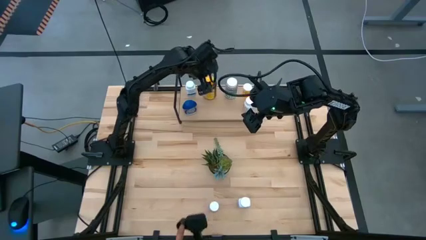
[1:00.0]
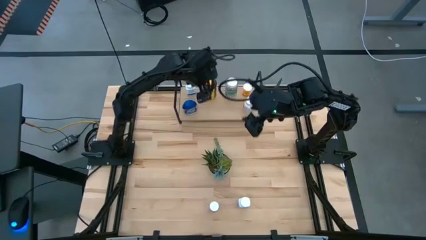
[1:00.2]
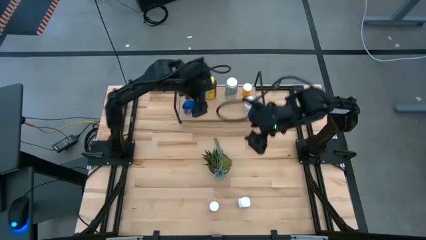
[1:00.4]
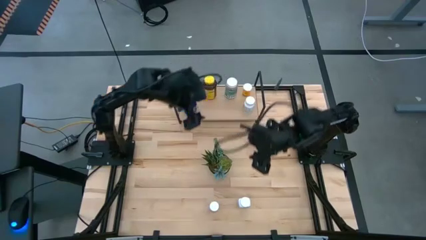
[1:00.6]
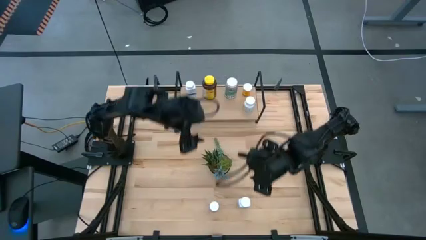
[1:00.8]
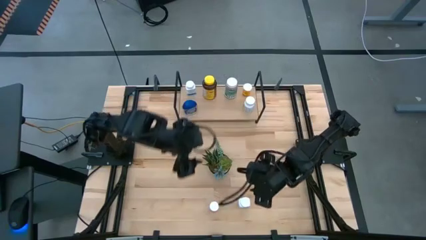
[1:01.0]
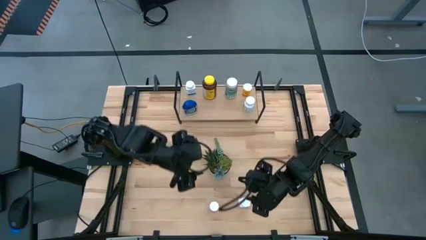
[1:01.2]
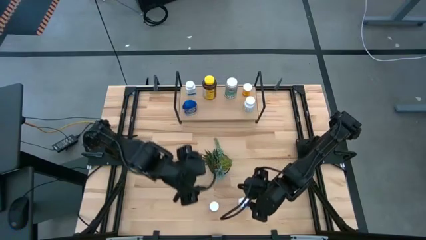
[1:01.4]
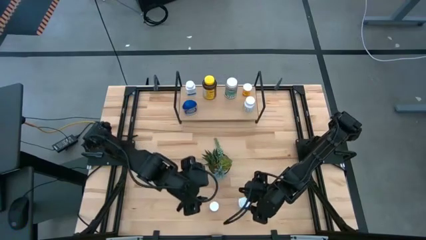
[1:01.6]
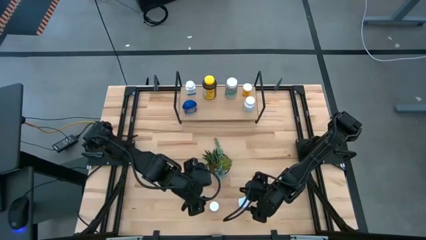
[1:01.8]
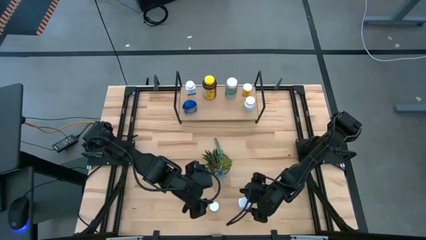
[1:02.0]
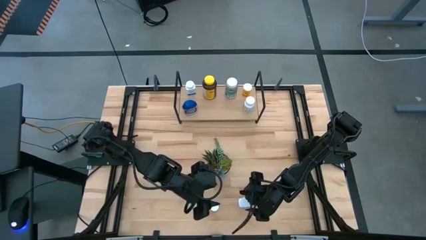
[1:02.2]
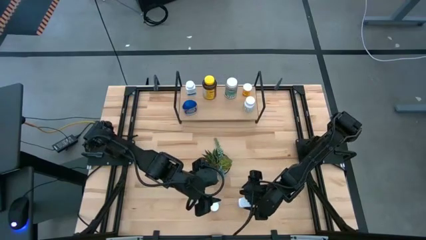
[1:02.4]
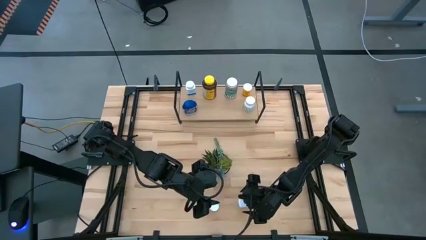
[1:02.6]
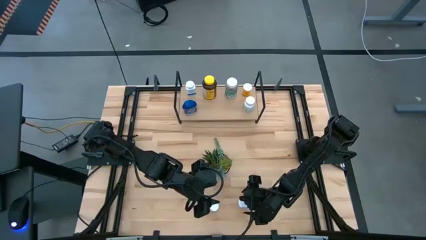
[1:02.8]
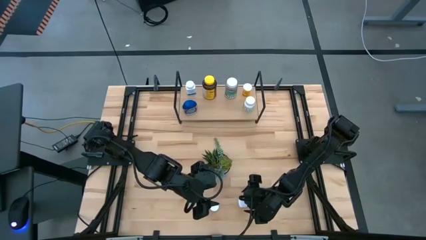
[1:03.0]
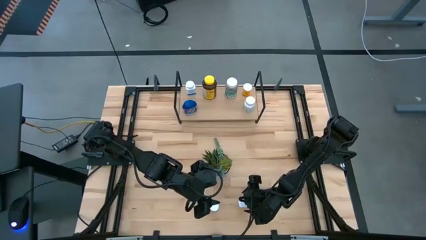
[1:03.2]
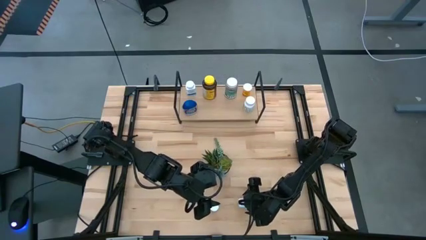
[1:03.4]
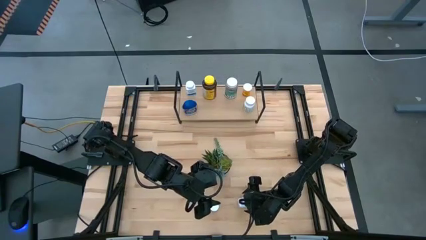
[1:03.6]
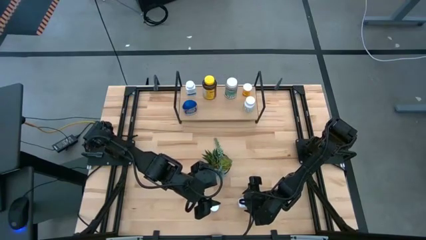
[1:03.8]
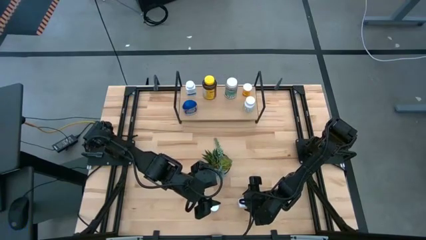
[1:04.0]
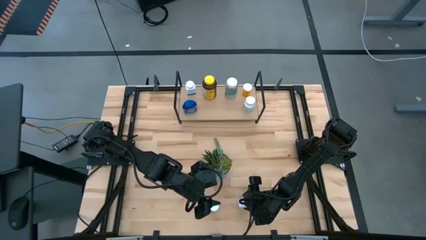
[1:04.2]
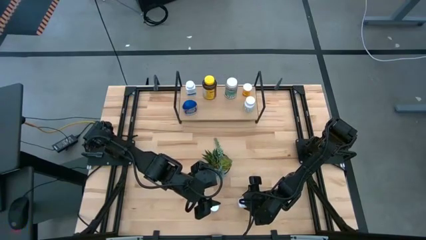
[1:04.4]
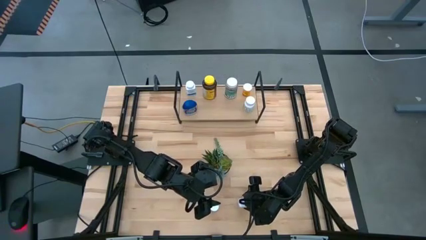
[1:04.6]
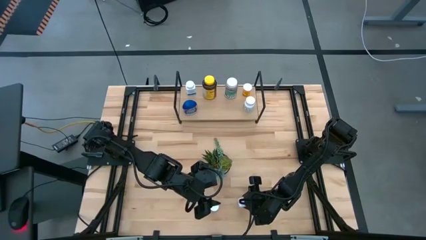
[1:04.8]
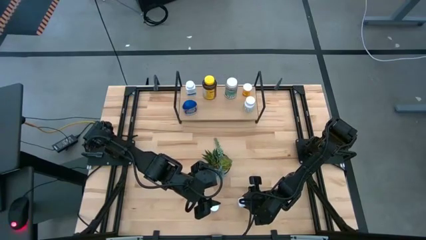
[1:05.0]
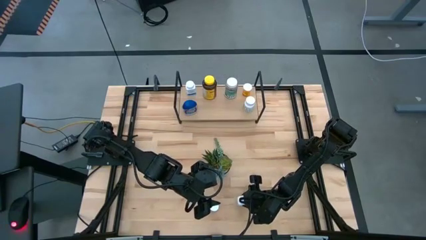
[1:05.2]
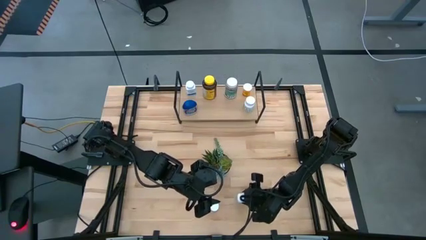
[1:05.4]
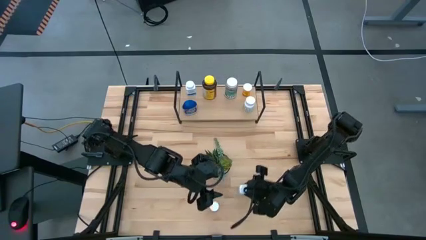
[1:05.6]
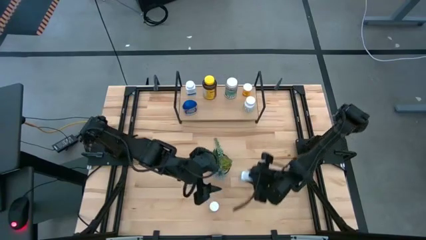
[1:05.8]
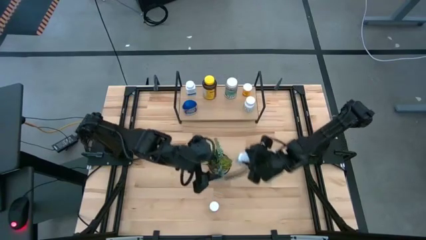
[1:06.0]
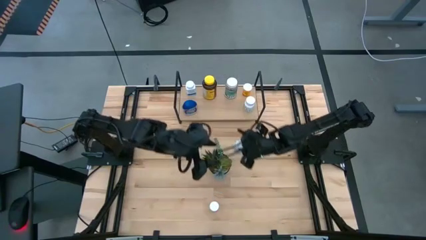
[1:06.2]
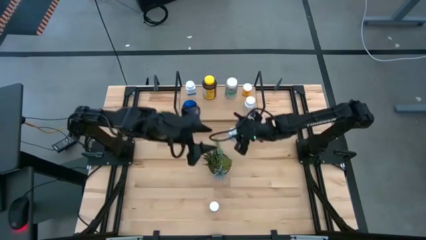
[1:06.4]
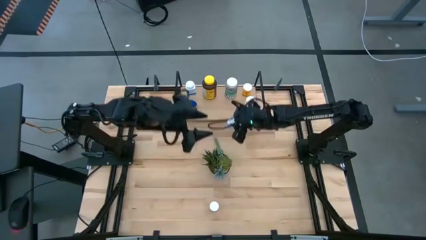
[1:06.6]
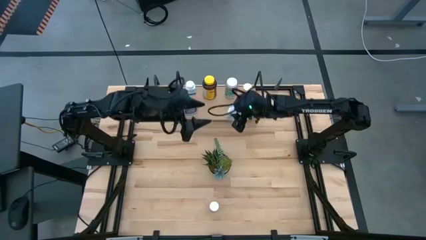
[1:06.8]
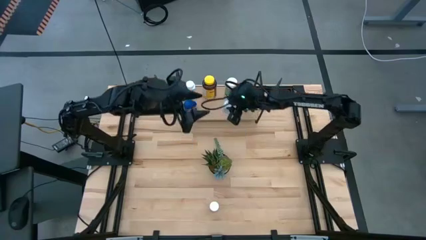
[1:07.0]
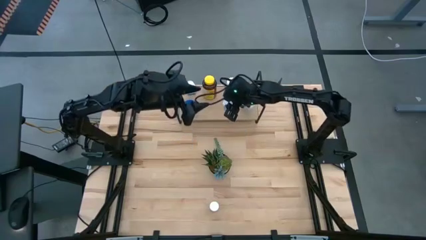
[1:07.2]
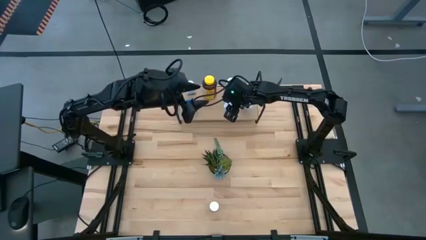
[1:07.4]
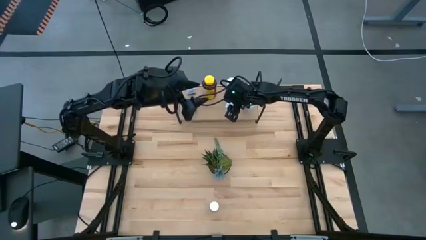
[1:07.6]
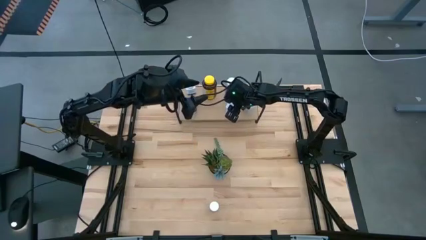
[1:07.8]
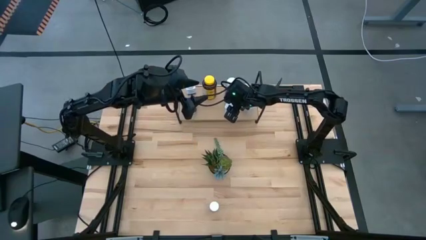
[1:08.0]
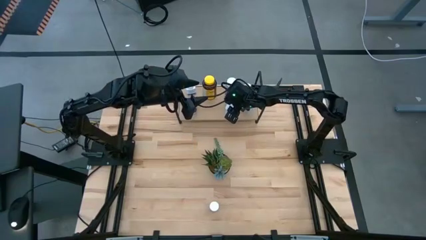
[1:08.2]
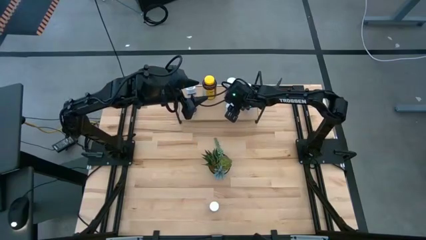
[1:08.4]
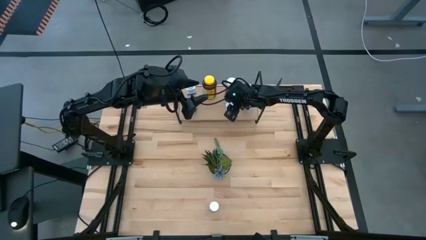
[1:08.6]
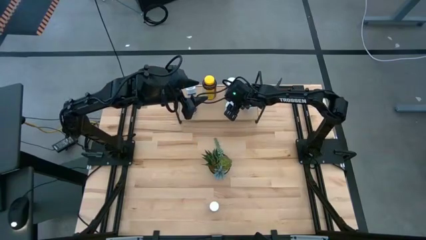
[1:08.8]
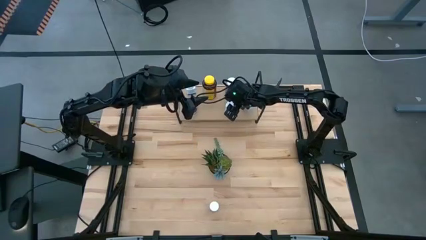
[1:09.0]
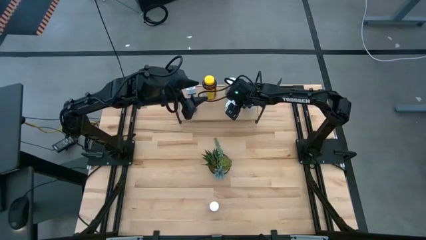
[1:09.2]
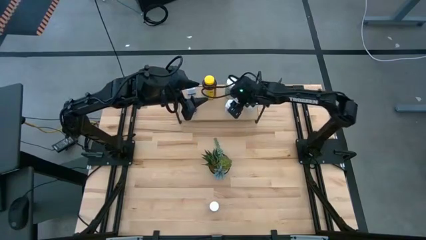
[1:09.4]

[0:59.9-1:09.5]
Task: Pick and place medicine bottles onto shelf by color
Put the white pill bottle on the shelf

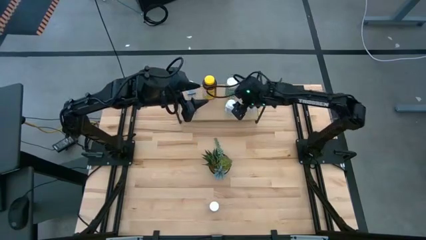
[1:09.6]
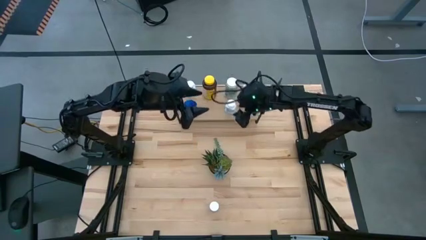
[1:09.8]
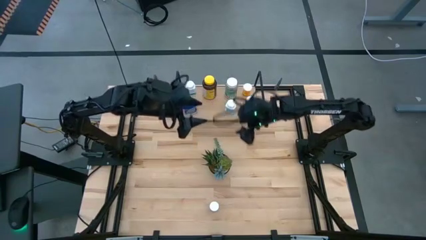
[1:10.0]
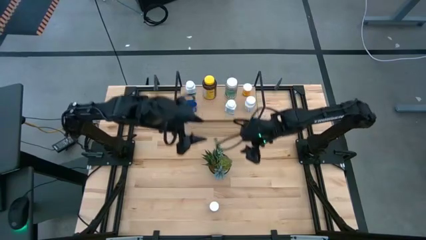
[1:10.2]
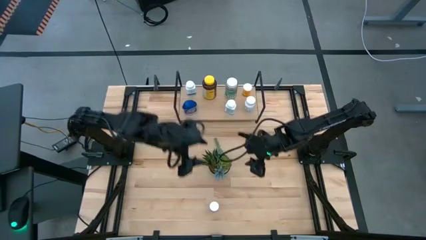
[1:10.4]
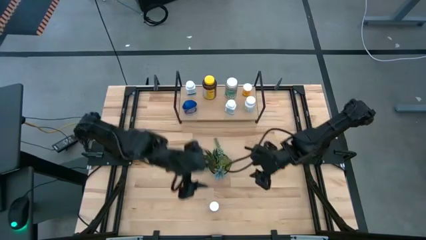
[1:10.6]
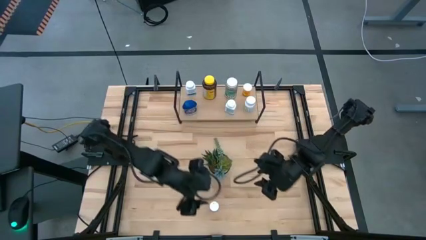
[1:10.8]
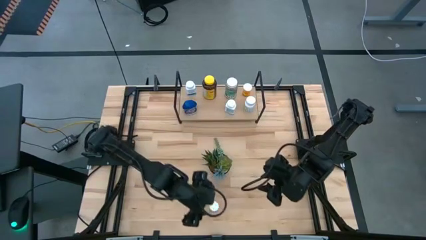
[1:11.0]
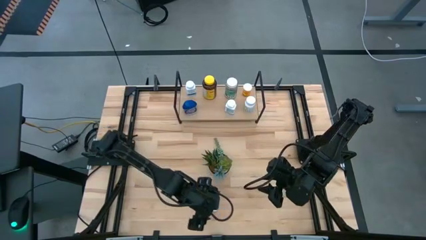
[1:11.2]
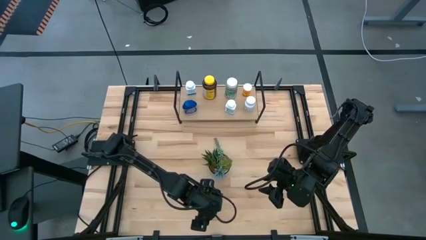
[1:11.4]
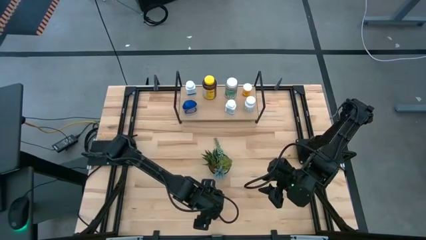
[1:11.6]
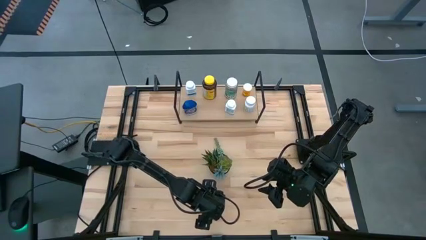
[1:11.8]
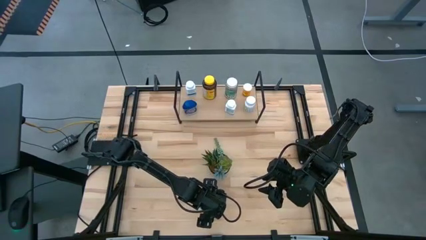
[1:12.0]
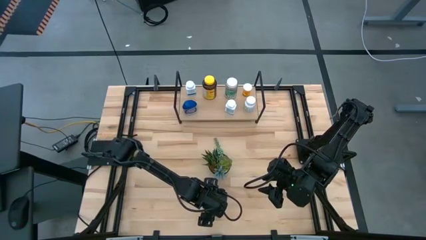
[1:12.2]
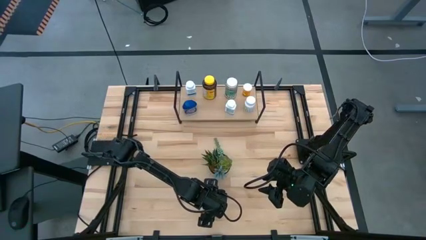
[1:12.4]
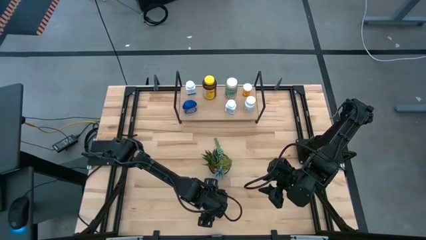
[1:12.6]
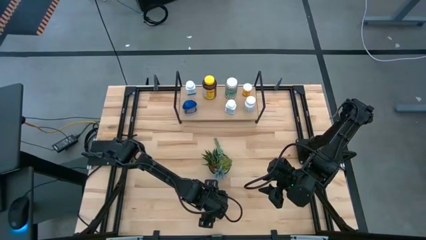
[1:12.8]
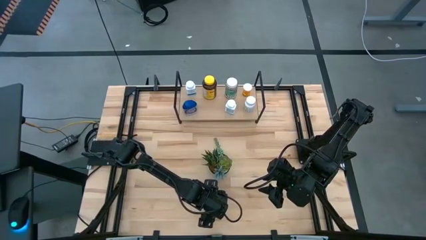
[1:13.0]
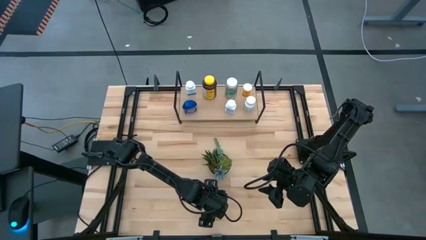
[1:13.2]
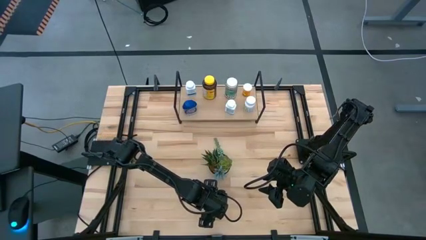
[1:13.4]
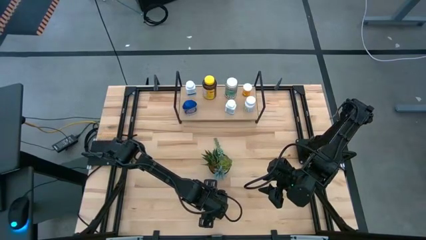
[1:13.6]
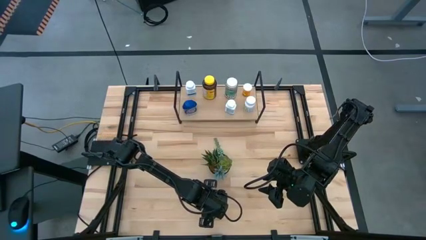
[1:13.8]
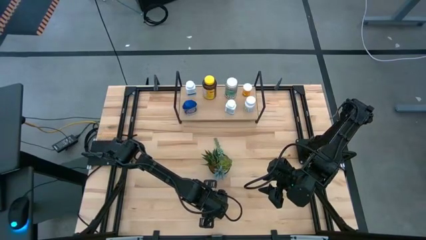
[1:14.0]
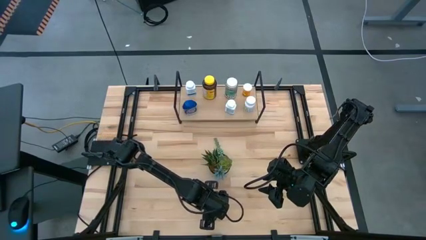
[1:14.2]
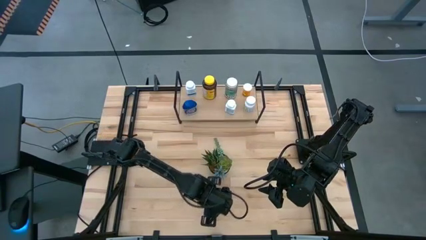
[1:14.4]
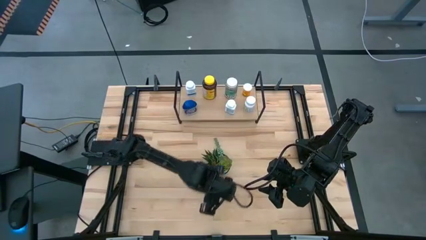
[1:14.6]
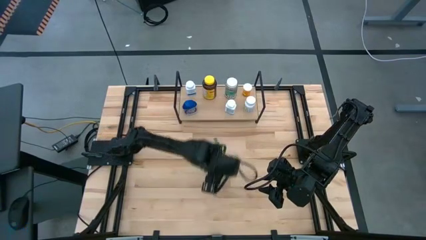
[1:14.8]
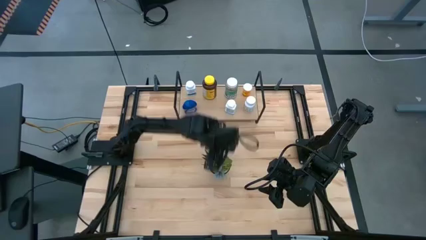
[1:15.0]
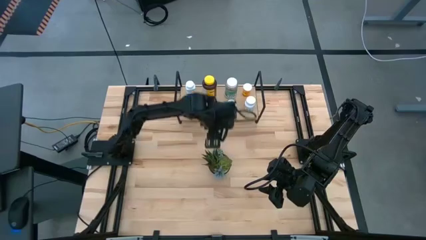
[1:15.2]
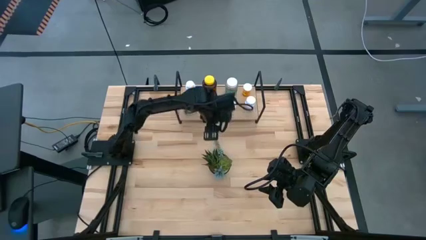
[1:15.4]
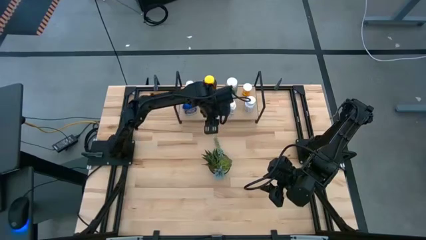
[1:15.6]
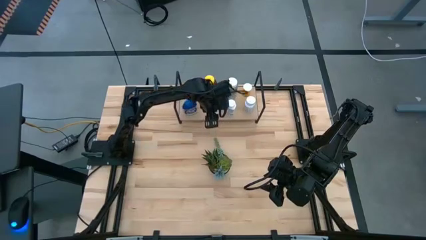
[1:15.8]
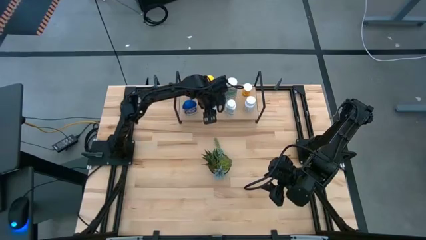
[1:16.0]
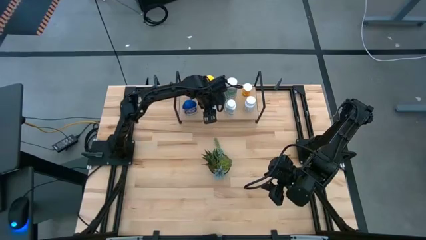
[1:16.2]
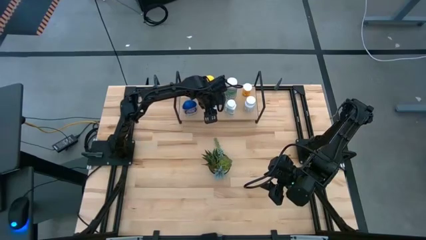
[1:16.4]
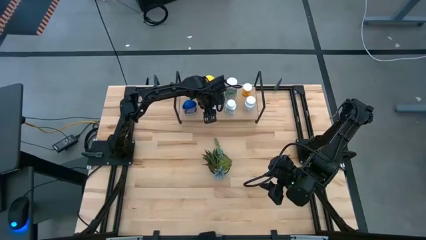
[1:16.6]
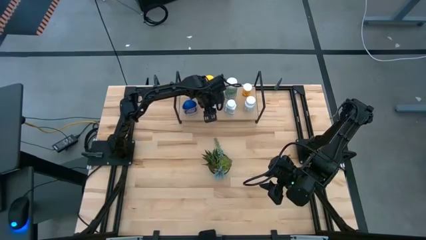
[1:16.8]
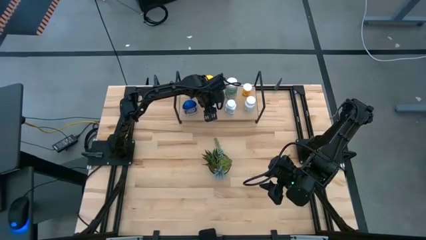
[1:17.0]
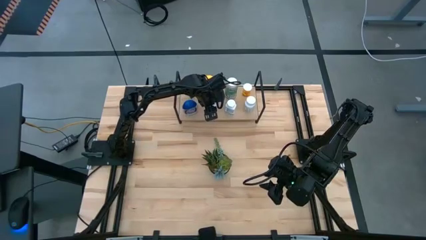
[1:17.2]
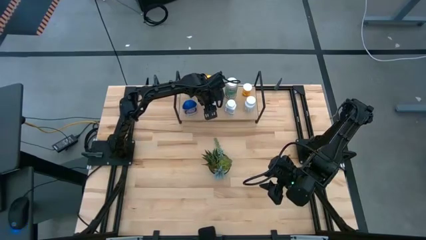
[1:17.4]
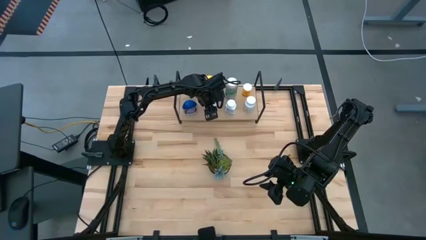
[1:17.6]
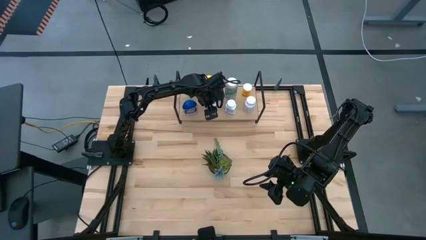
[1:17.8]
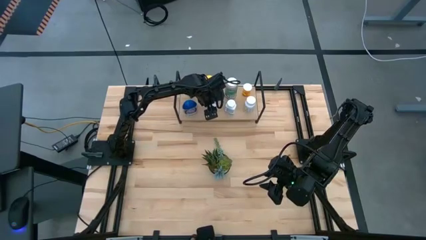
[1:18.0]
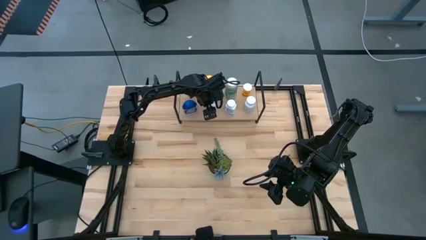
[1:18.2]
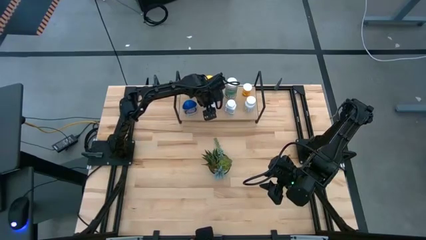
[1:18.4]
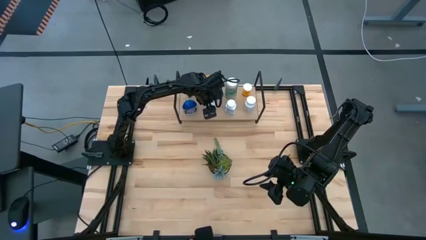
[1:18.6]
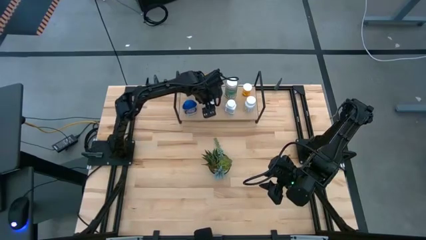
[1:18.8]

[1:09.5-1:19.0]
Put the pink medicine bottle on the shelf
